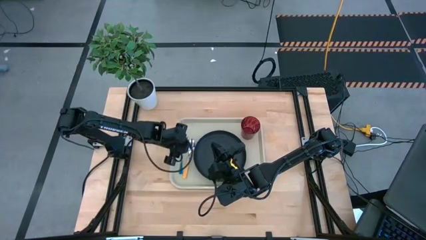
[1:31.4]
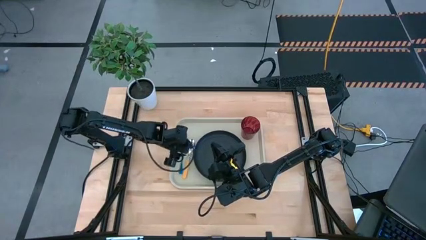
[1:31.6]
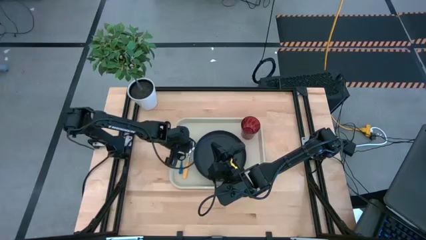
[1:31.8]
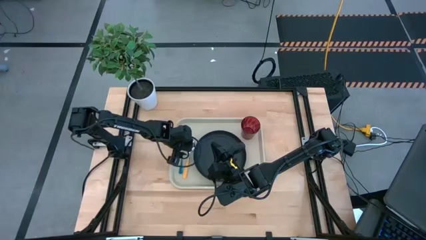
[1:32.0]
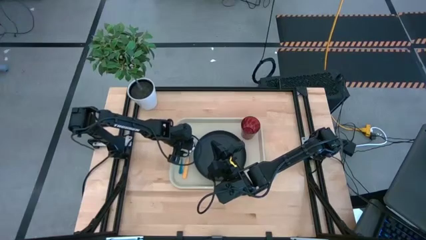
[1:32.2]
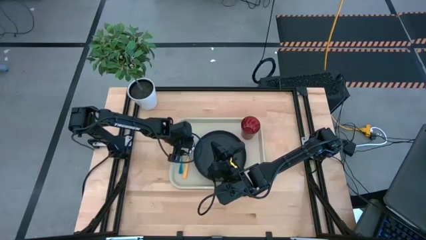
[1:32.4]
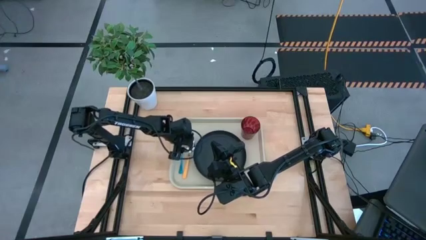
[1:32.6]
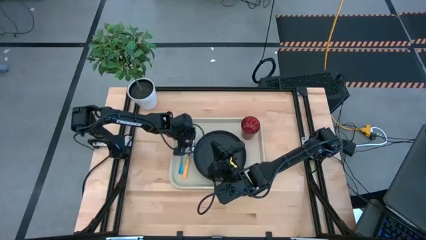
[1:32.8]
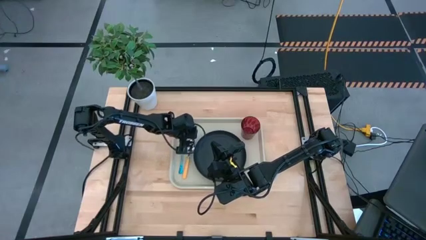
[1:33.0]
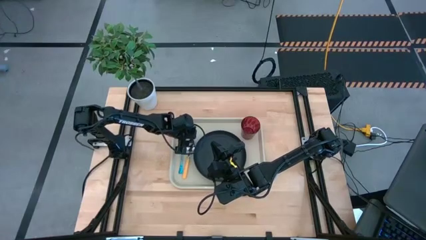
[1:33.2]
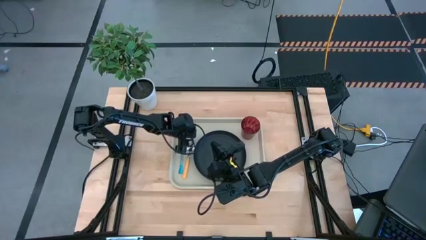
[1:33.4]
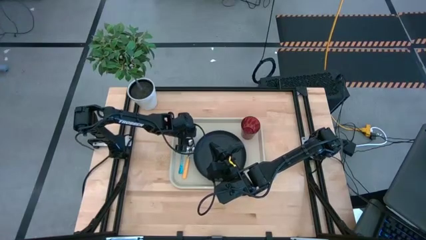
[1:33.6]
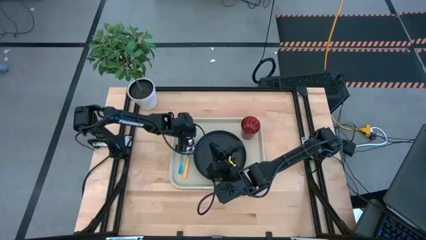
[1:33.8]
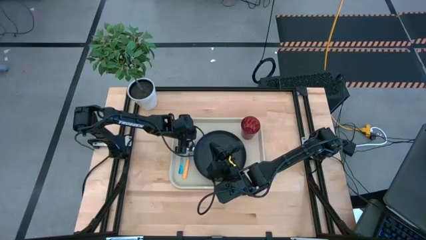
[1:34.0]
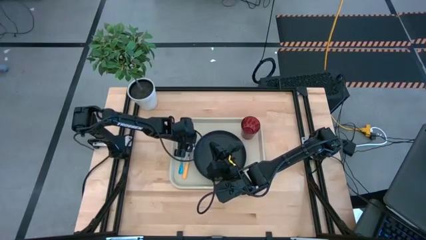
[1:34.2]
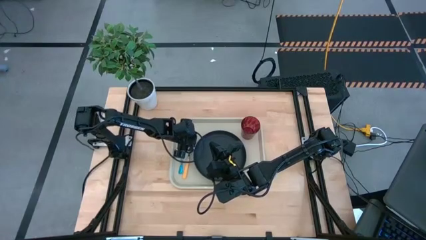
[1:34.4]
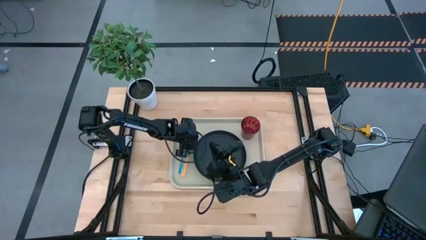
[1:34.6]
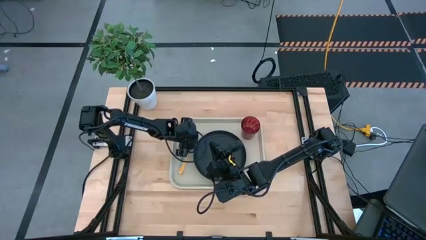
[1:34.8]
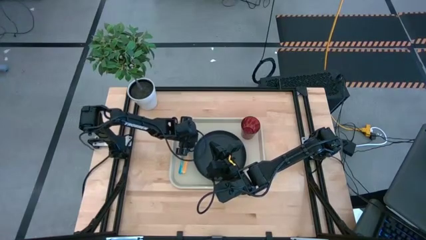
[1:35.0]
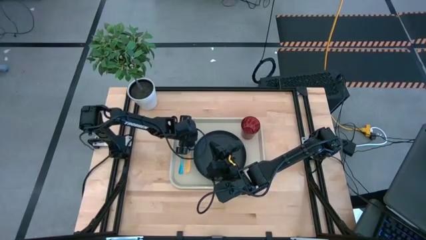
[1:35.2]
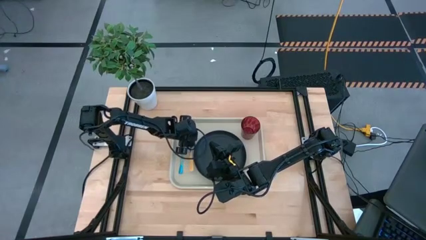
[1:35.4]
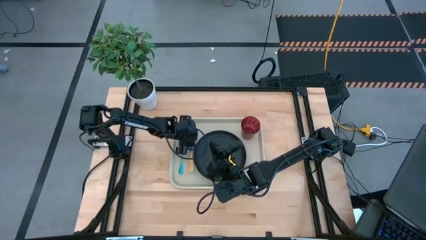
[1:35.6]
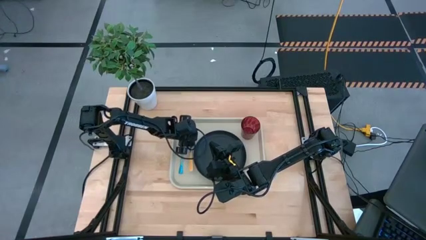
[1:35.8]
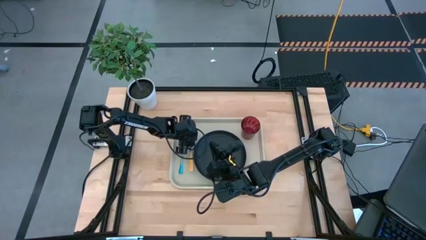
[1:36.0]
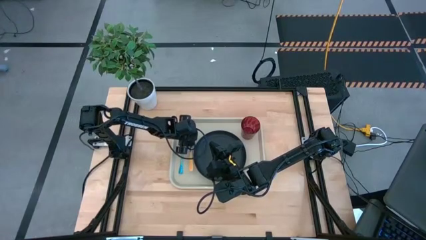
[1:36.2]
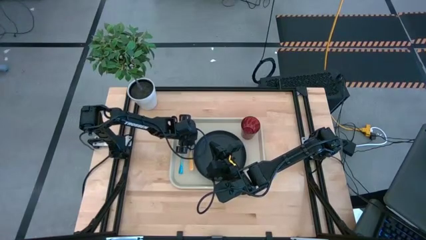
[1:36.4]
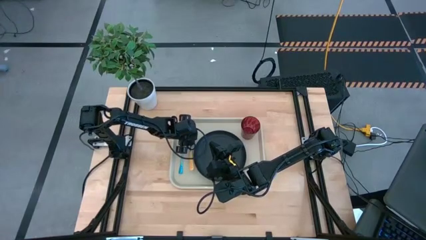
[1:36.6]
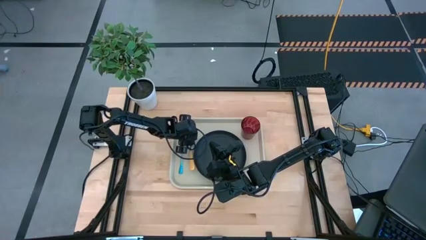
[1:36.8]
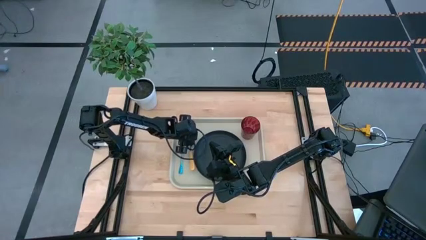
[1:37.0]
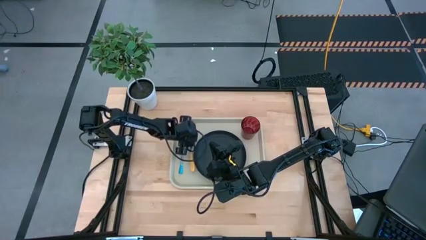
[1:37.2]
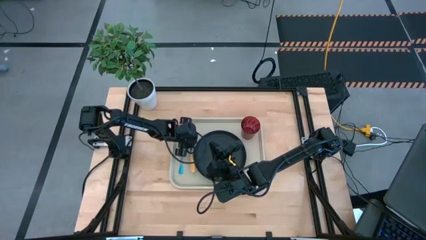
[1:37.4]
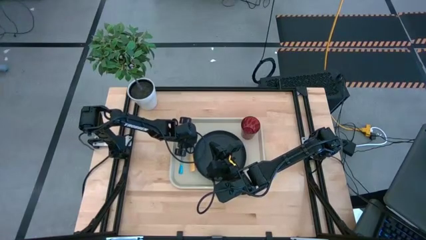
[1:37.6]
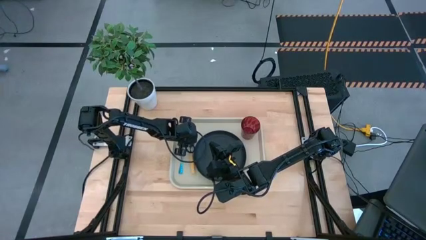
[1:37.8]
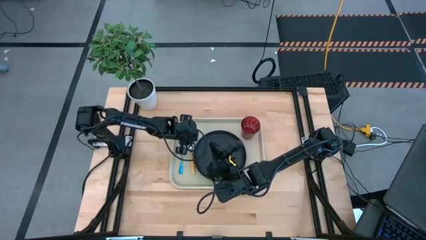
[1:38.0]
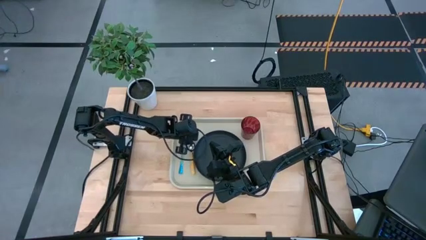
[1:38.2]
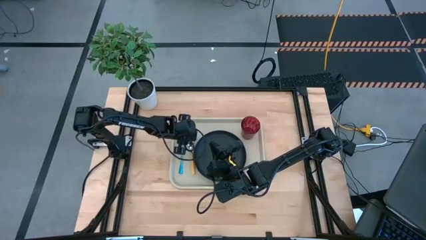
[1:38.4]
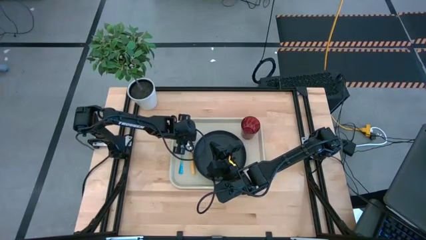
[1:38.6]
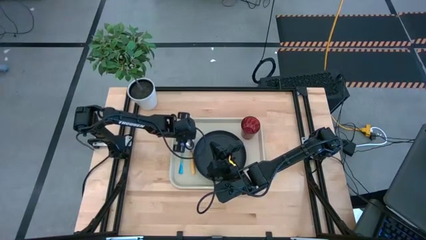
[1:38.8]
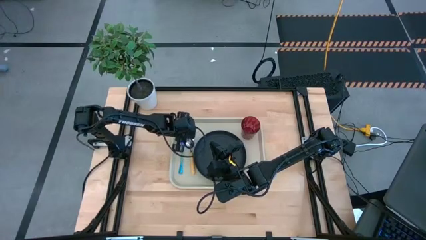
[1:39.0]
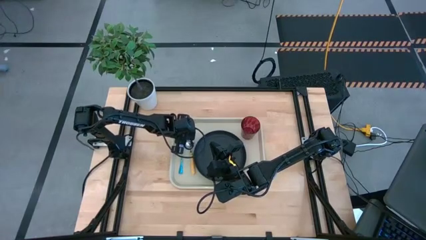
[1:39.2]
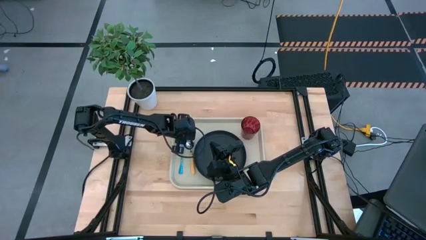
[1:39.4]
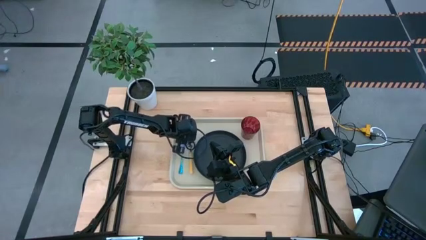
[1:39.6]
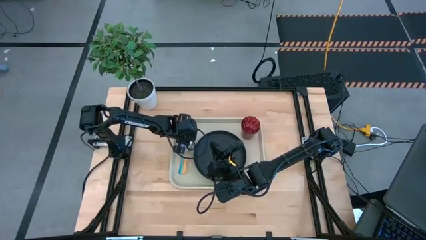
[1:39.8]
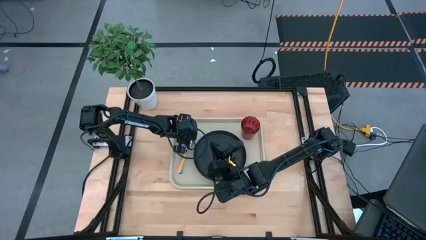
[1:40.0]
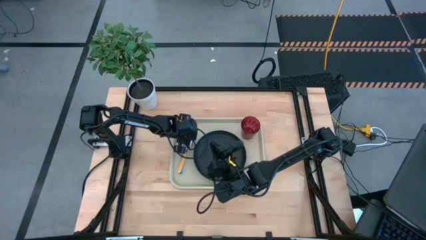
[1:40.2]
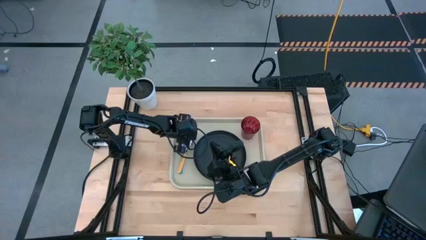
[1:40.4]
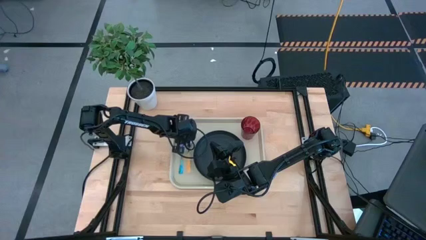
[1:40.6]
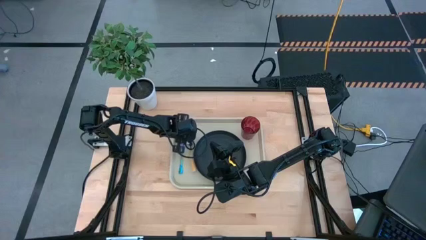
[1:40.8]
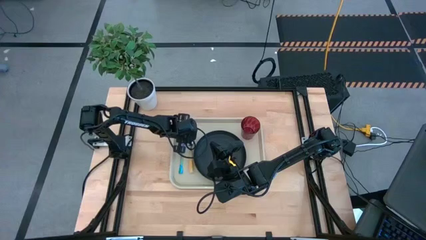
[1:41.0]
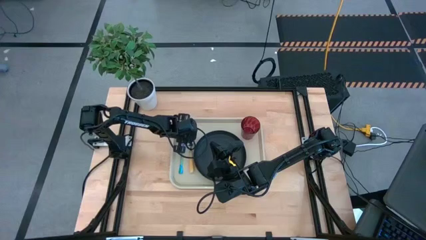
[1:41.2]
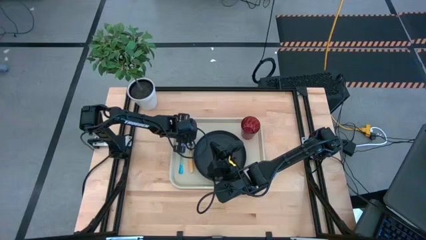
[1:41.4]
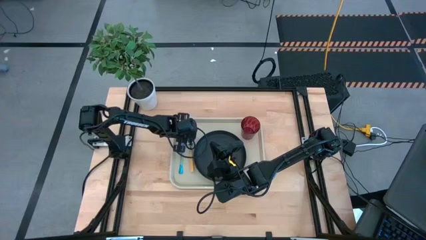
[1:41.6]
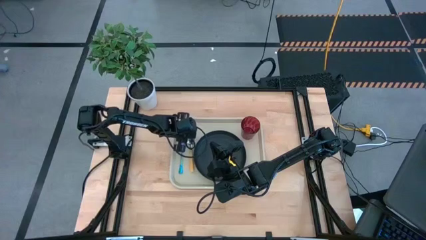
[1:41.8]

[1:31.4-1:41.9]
Task: Pick and place plate/cup/fork/spoon on tray
Put the orange spoon on the gray tray between the black plate and the blue fork

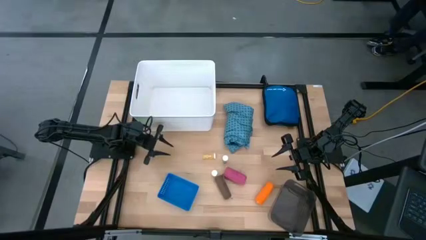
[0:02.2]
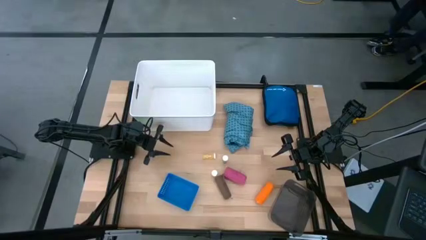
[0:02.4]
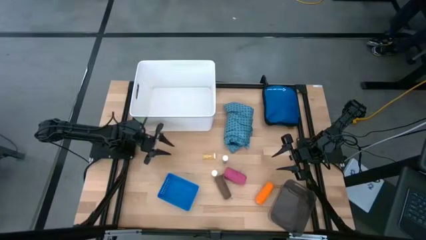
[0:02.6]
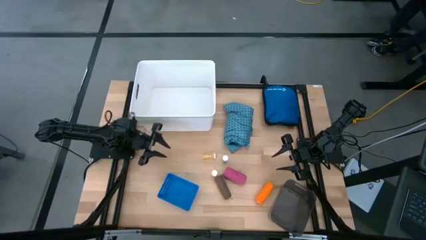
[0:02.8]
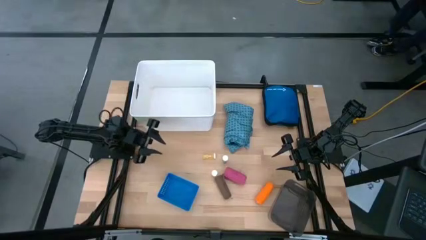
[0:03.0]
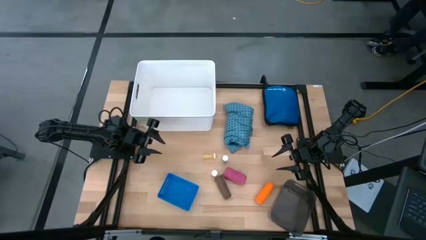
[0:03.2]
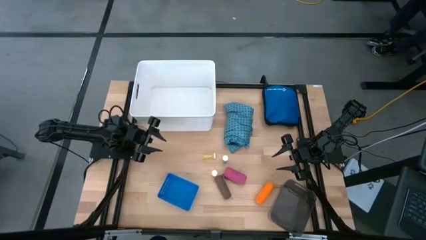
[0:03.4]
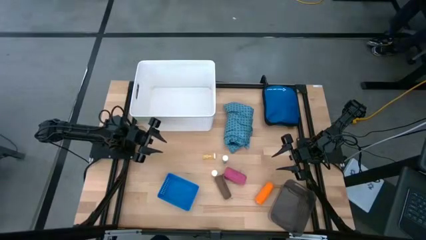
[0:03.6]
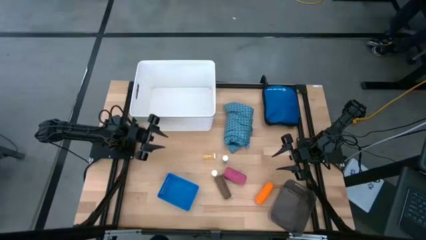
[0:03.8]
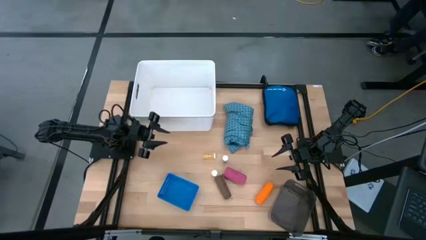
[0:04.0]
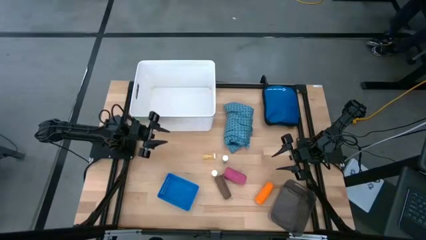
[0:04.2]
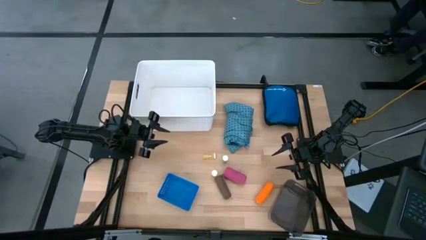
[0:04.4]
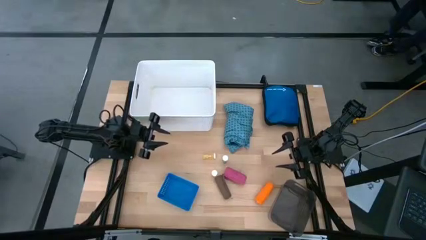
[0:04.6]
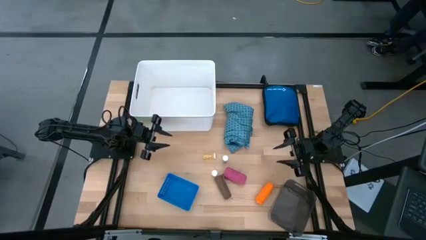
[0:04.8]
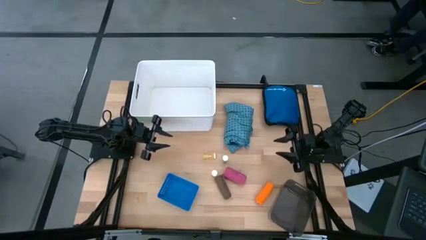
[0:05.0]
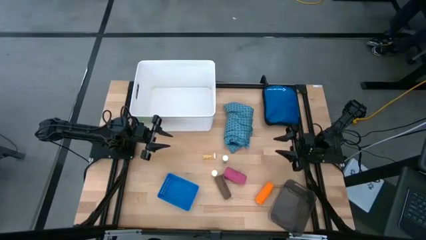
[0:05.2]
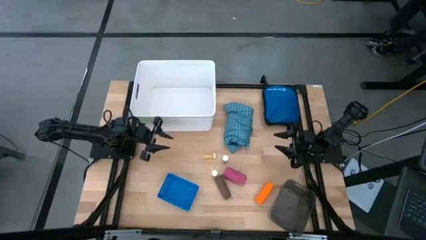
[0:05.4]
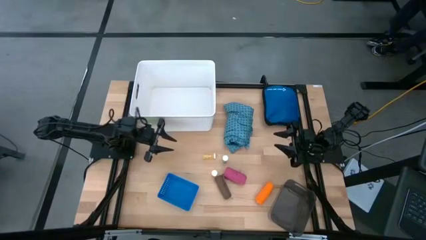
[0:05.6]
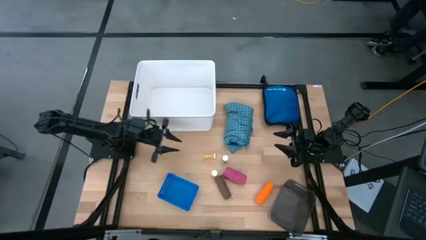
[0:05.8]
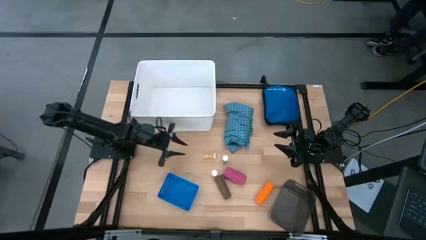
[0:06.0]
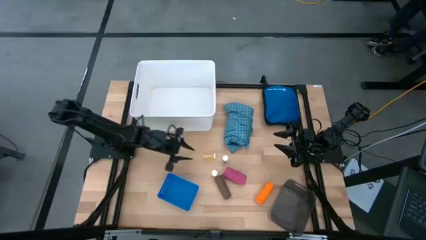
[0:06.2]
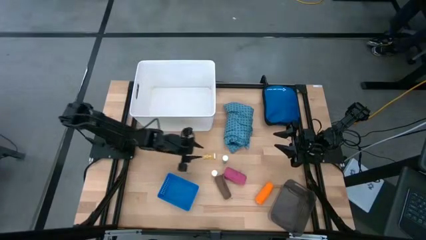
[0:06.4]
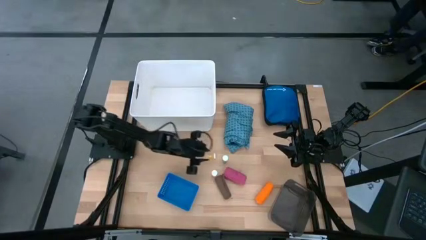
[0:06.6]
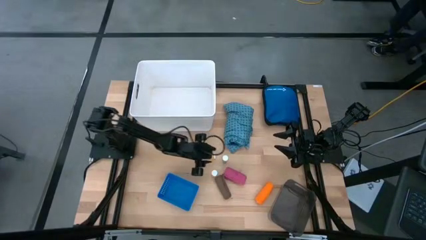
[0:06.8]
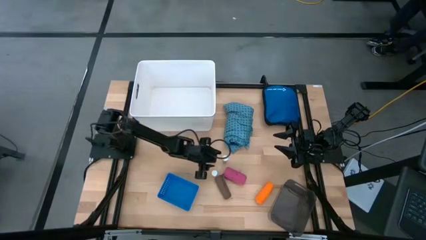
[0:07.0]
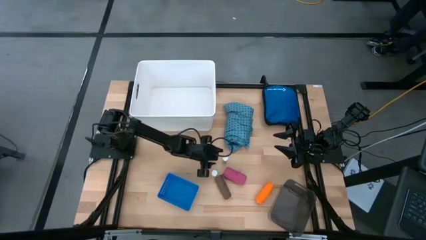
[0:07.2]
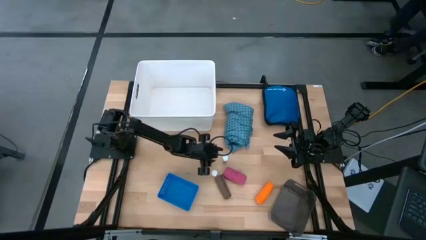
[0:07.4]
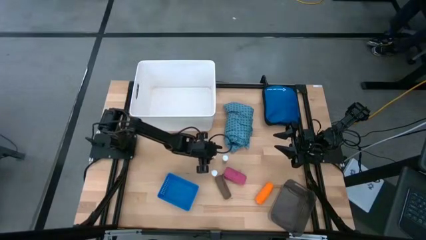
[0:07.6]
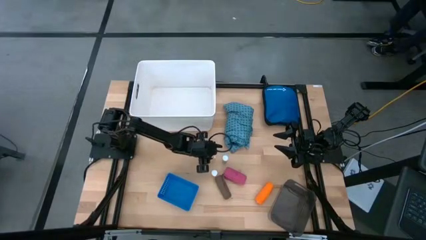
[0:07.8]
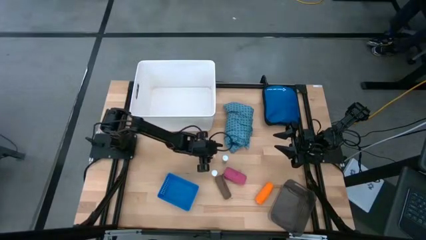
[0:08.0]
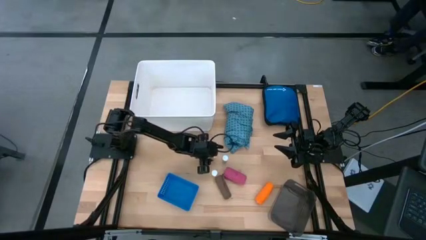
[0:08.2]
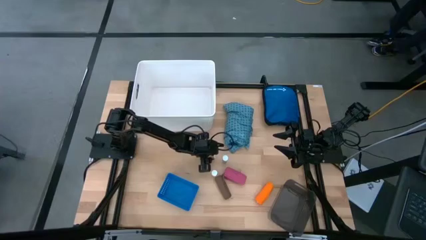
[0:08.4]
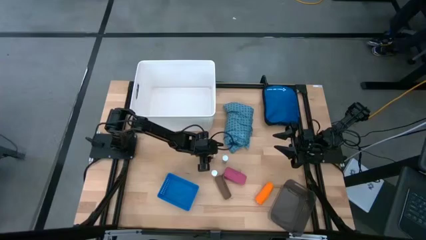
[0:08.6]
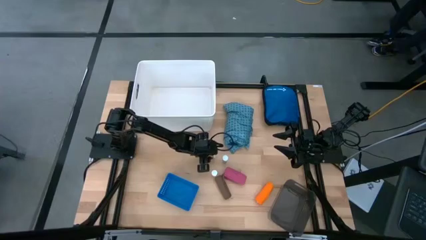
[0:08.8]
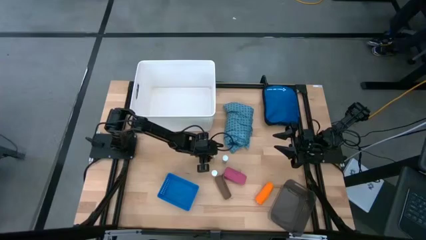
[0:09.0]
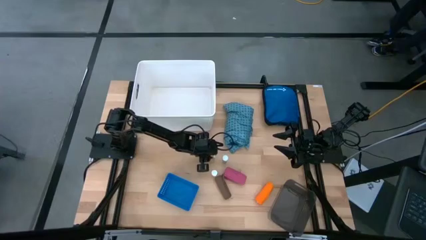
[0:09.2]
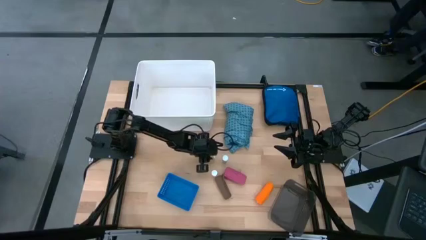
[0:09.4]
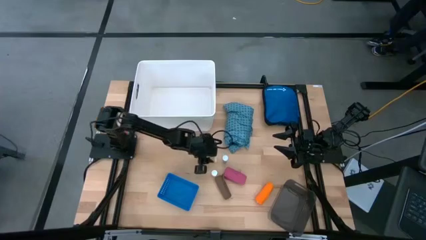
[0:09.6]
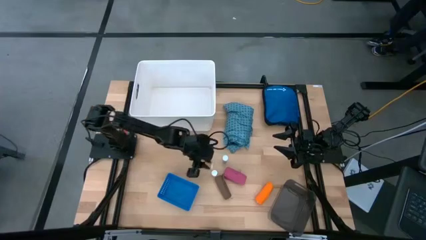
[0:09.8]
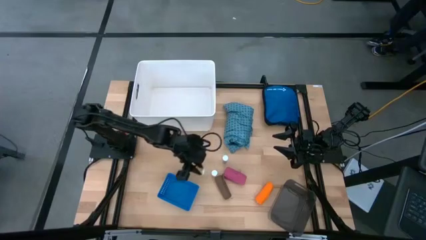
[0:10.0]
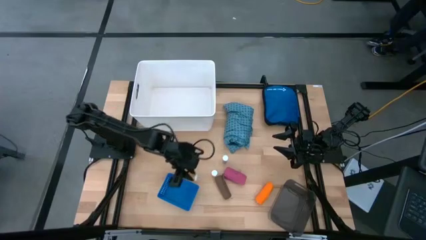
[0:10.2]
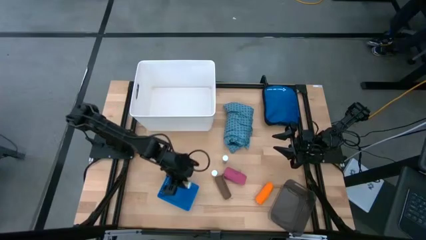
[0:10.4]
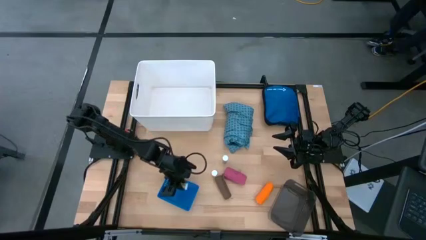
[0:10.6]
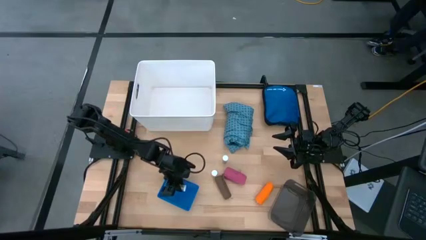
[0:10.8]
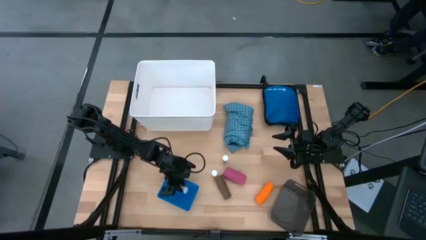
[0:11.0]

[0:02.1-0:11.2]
Task: Pick & Place Medicine items
Put the yellow medicine bottle into the blue bin
